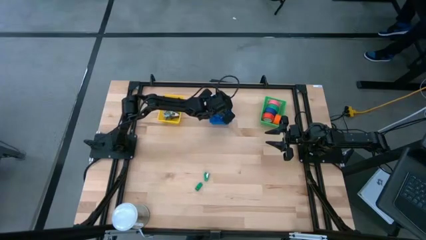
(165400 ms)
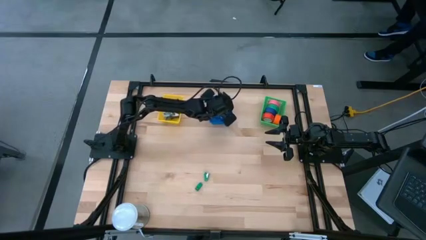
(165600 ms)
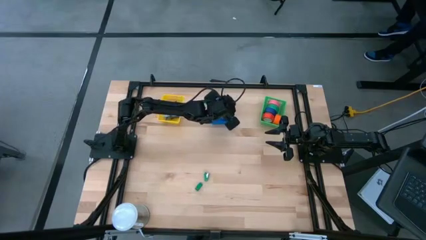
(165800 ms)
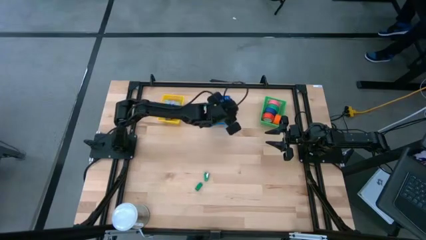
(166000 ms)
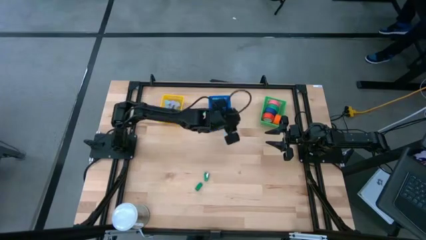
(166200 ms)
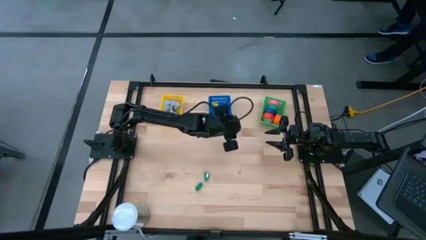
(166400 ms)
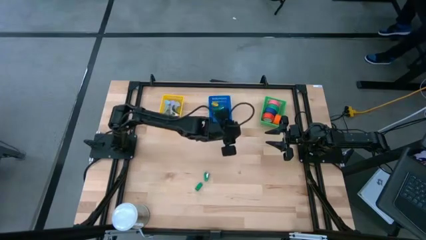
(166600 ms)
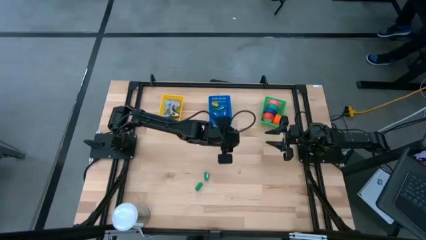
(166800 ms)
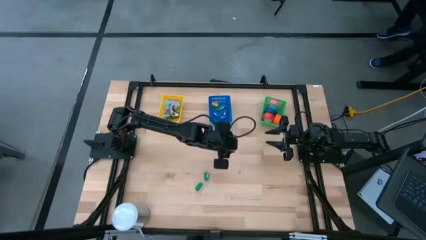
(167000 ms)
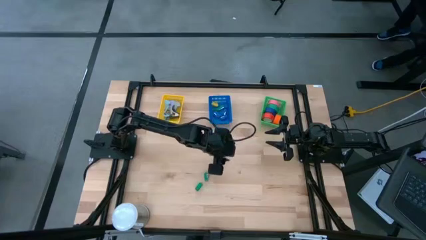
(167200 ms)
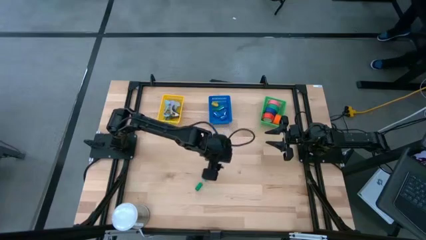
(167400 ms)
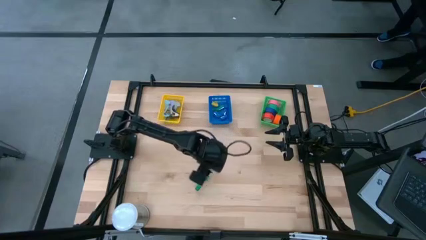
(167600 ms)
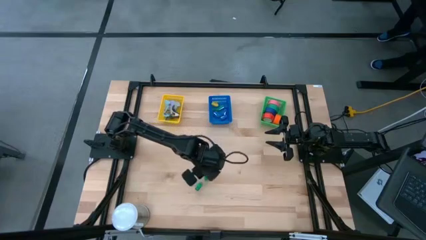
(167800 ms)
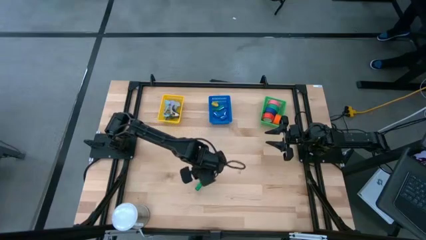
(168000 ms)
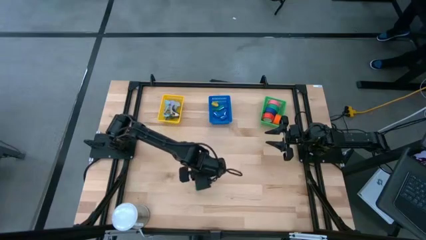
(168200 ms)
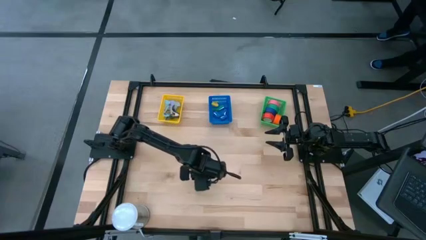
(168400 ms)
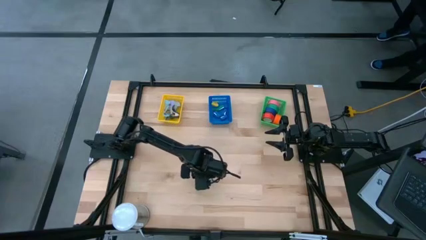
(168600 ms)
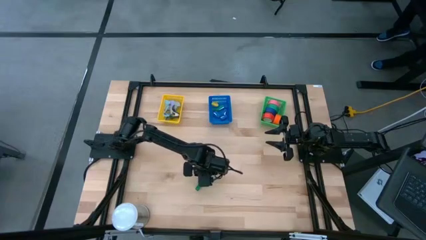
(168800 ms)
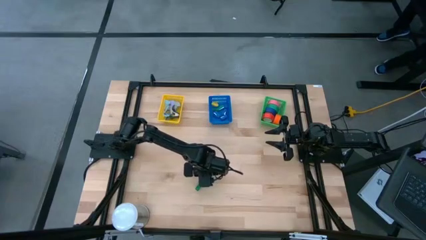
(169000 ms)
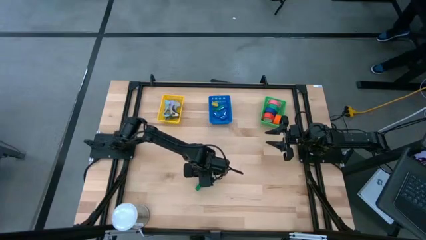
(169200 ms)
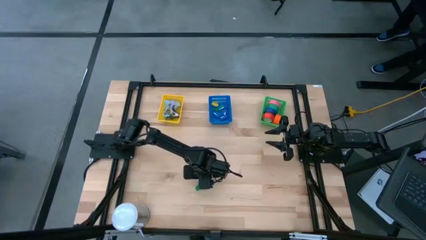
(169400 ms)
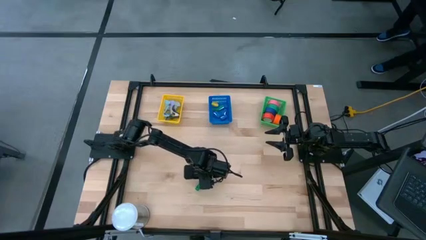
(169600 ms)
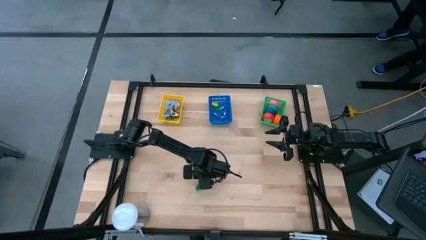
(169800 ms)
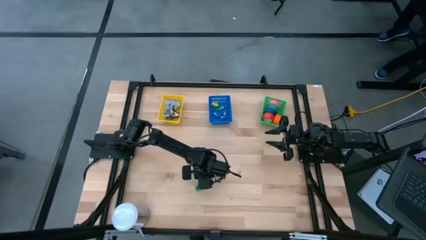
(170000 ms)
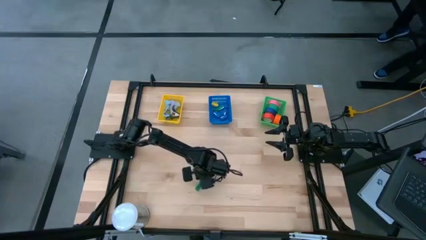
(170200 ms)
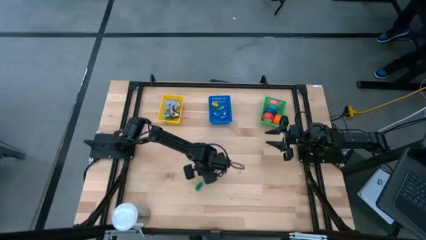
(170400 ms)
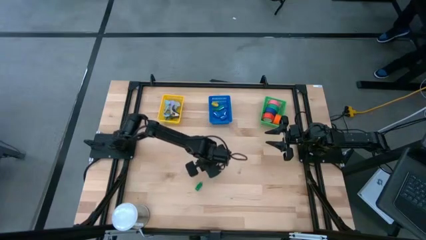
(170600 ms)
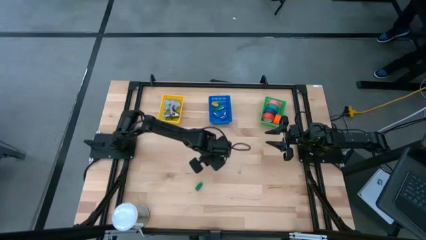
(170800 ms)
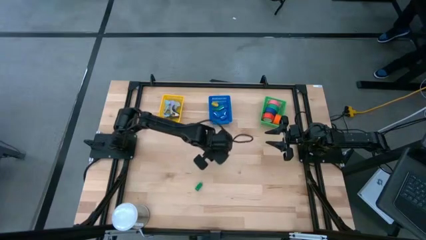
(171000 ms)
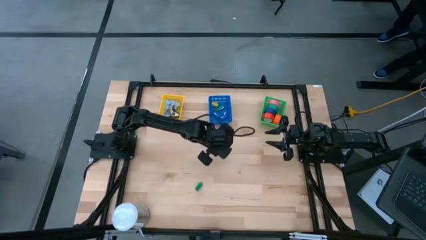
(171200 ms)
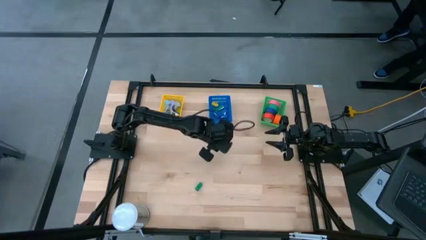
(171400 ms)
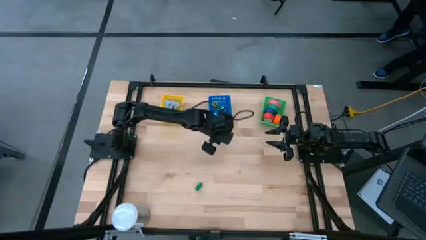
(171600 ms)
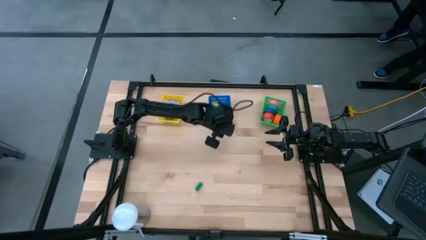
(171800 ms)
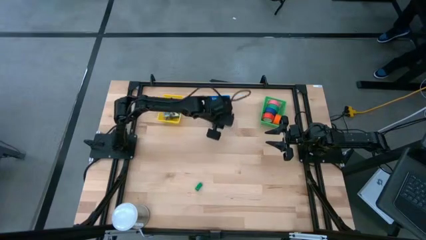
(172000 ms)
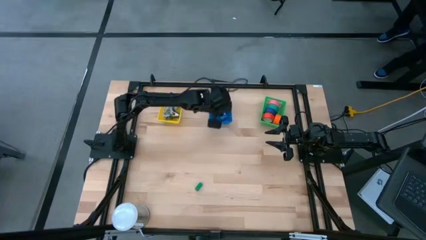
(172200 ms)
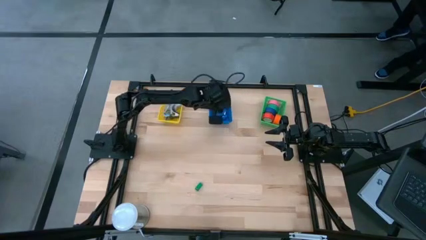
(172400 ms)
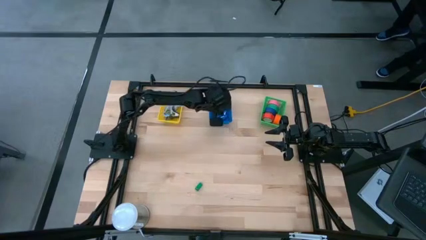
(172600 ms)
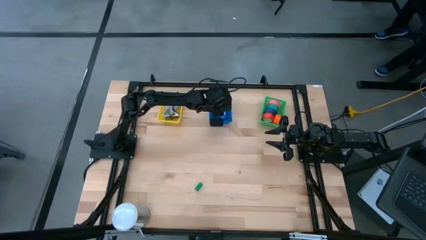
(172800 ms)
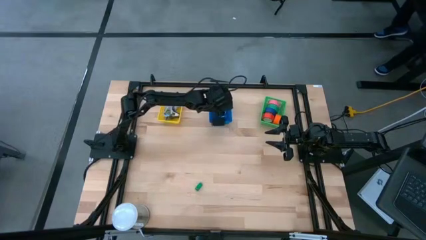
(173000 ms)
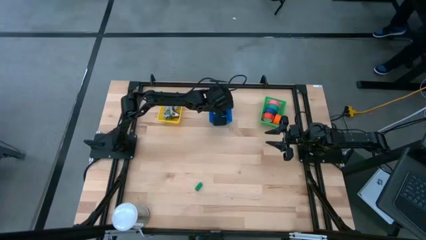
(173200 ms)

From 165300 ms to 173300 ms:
Task: Pick and place Stapler, Stapler remover, tape
Put the green stapler into the blue basket

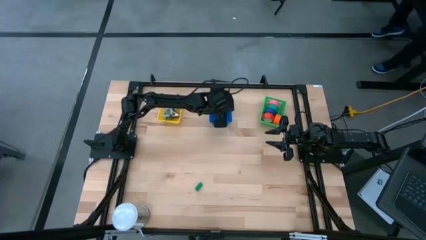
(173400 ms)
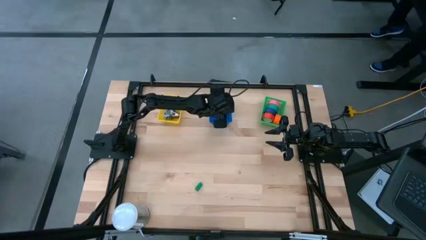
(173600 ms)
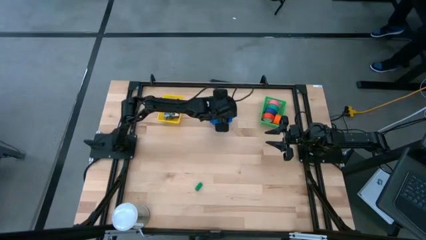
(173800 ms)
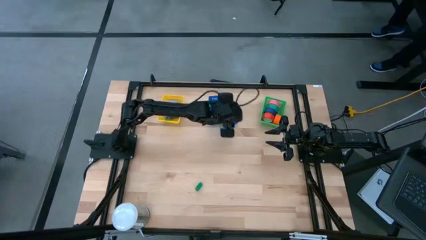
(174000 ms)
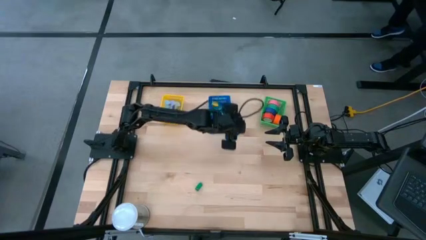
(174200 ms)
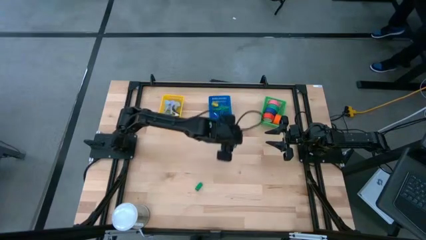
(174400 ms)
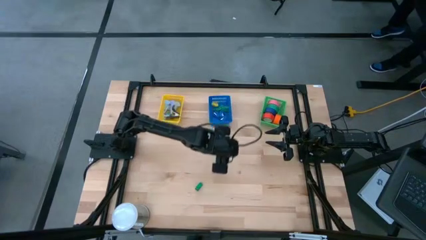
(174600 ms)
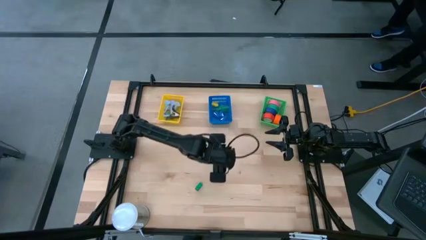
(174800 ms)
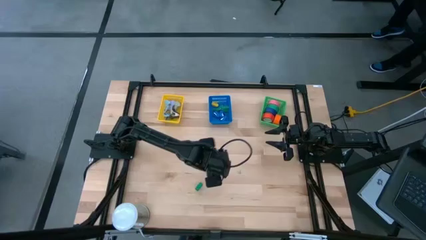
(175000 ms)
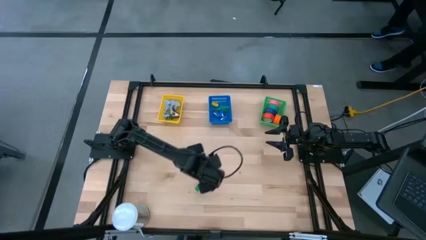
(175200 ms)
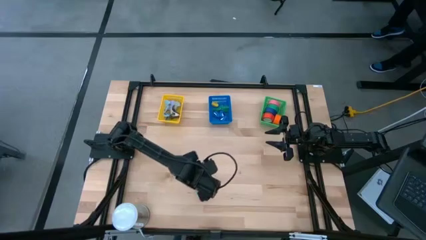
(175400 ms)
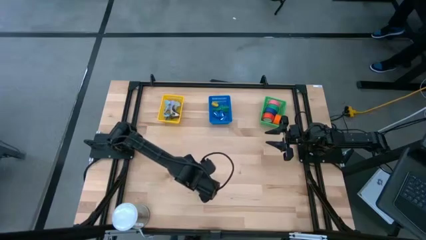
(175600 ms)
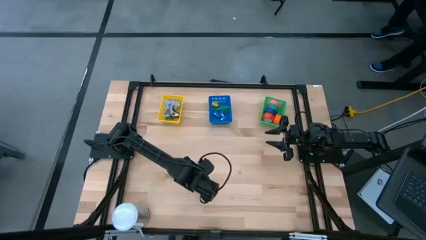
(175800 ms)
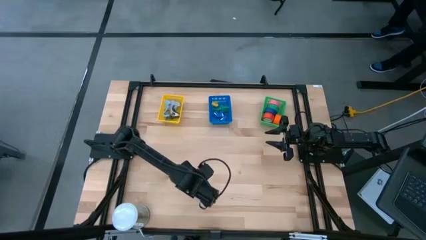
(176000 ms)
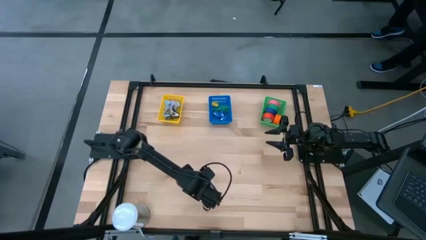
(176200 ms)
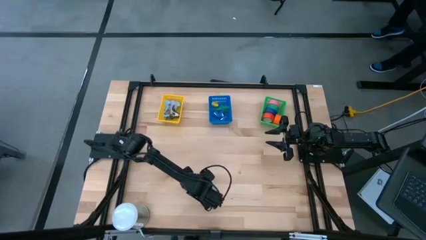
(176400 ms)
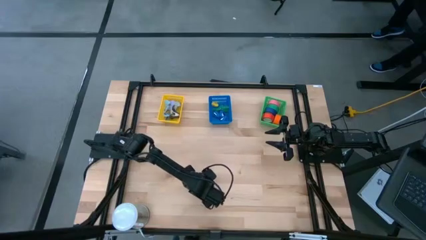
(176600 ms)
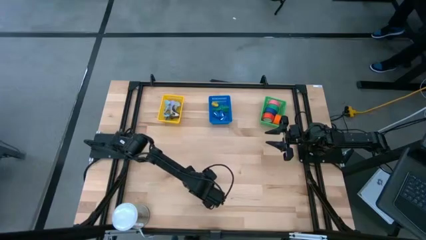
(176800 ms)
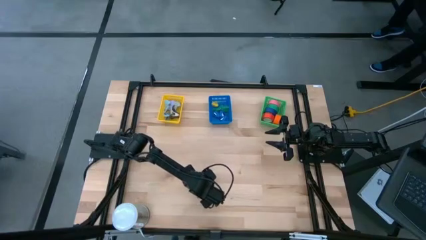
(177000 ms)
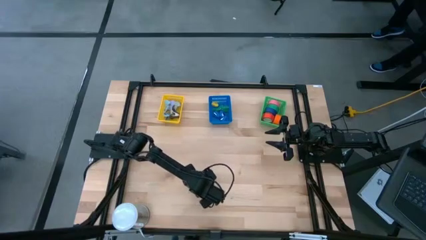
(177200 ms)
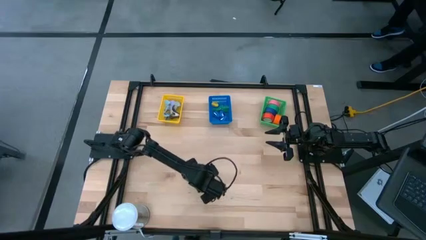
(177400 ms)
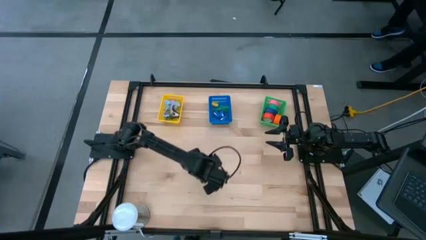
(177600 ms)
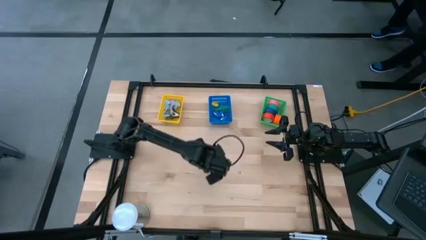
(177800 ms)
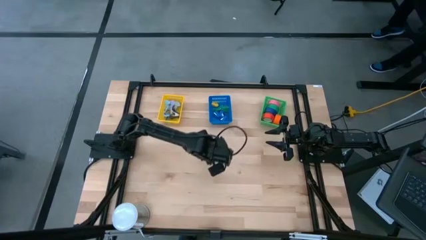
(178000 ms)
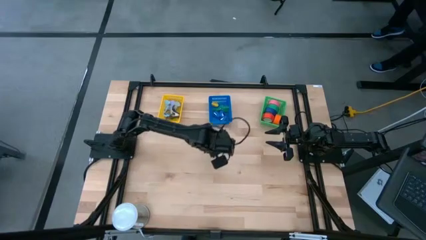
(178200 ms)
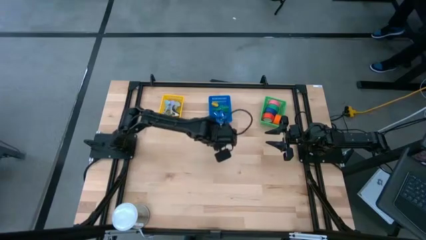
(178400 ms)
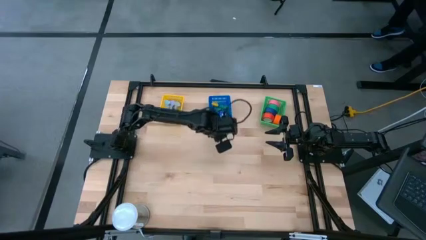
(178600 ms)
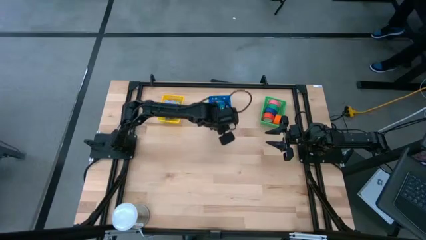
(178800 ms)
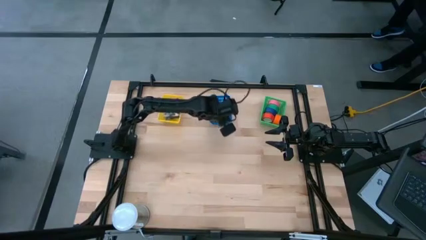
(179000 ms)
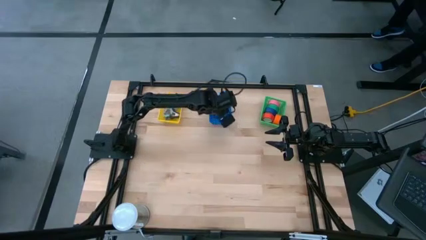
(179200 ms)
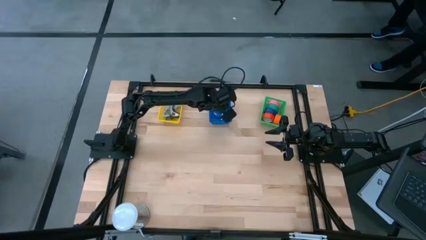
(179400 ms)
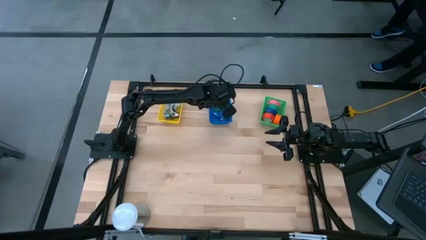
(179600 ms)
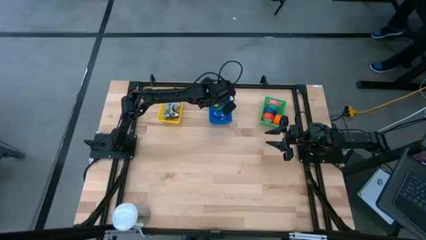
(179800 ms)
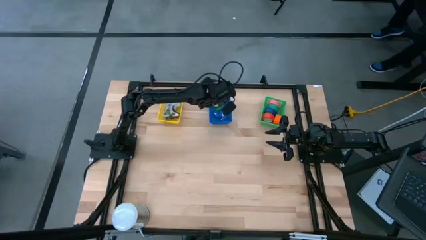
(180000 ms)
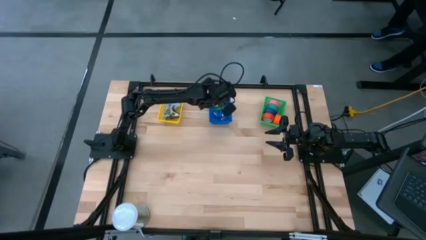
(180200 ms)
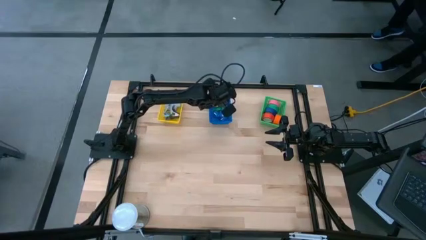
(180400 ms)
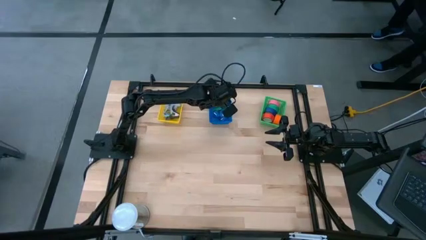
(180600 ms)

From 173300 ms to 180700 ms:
Put the green stapler into the blue basket
